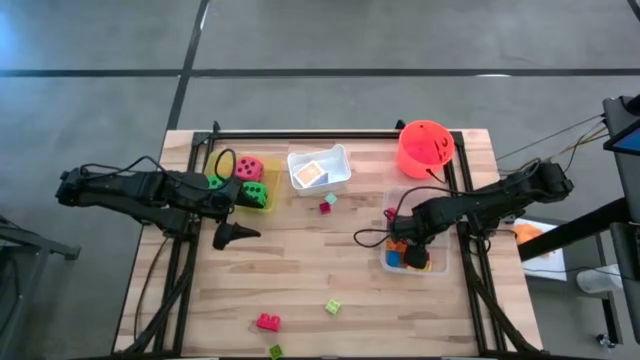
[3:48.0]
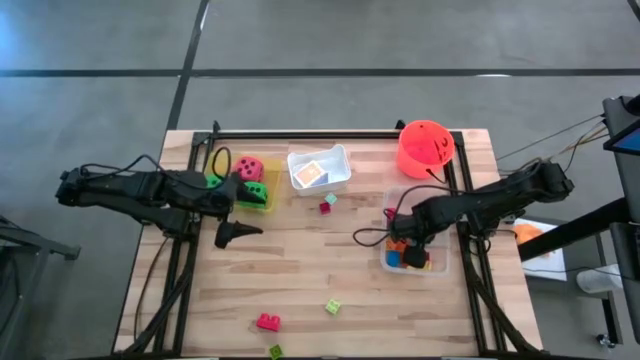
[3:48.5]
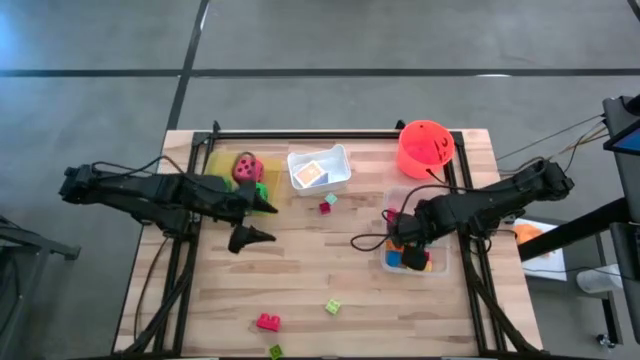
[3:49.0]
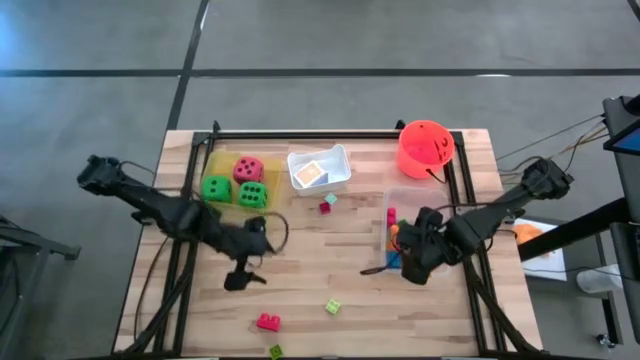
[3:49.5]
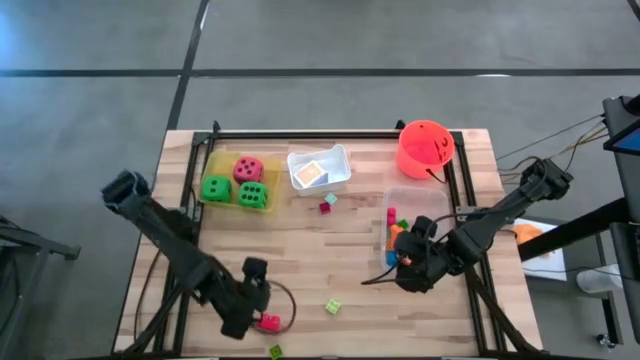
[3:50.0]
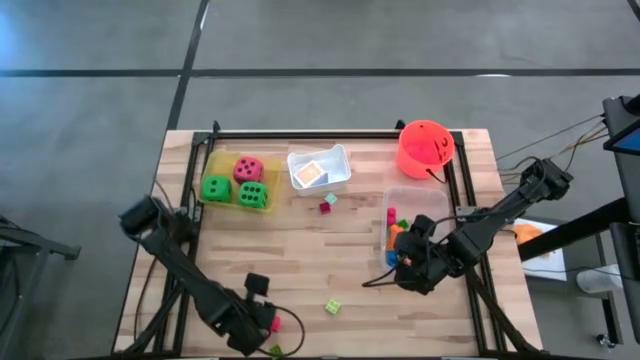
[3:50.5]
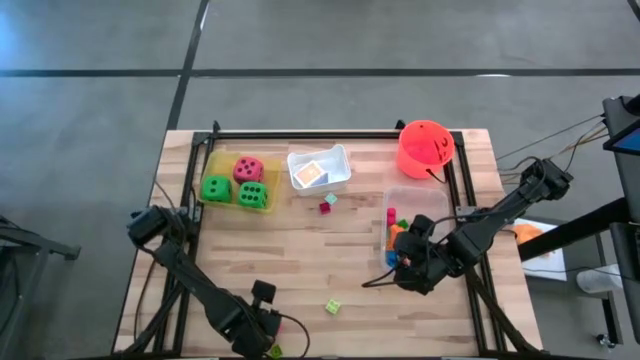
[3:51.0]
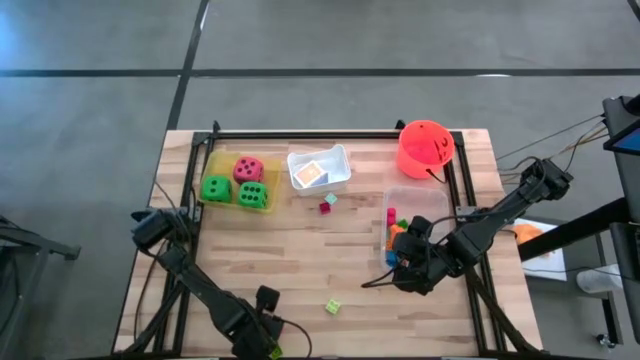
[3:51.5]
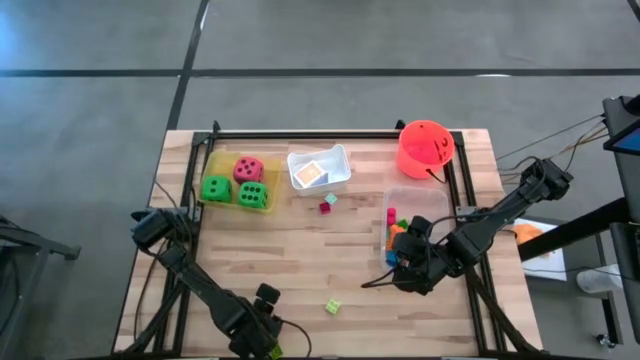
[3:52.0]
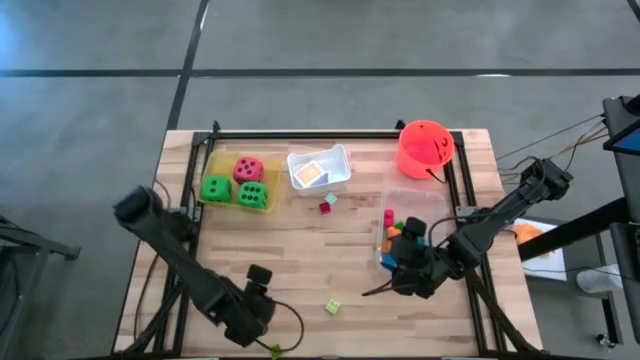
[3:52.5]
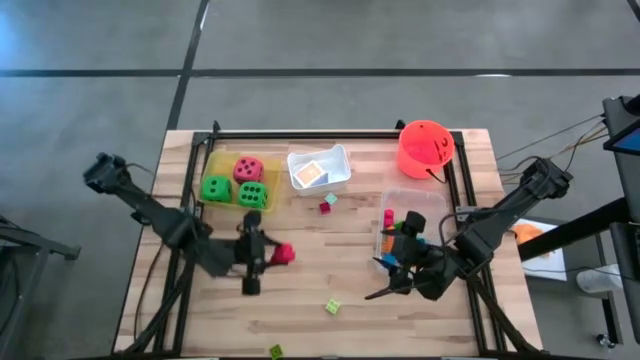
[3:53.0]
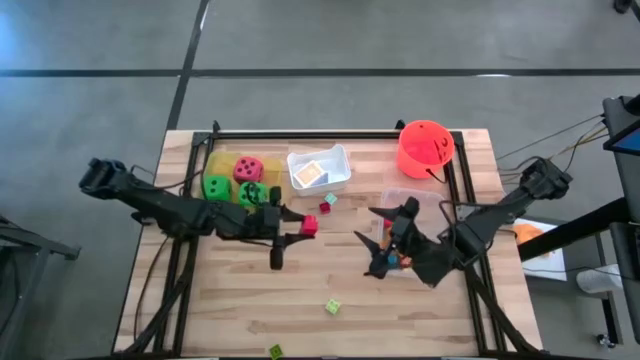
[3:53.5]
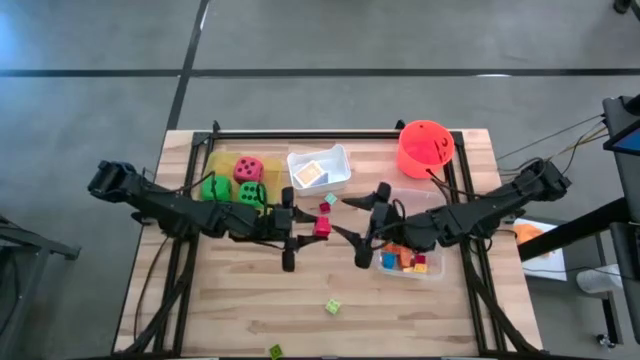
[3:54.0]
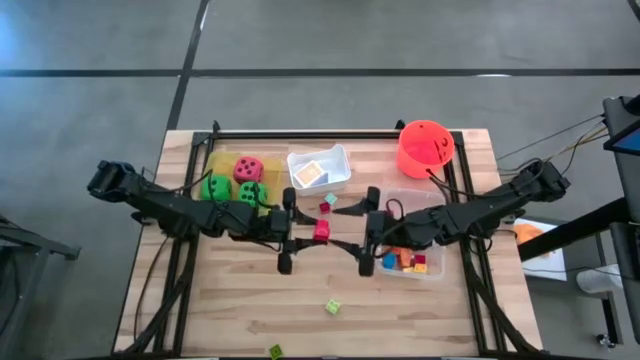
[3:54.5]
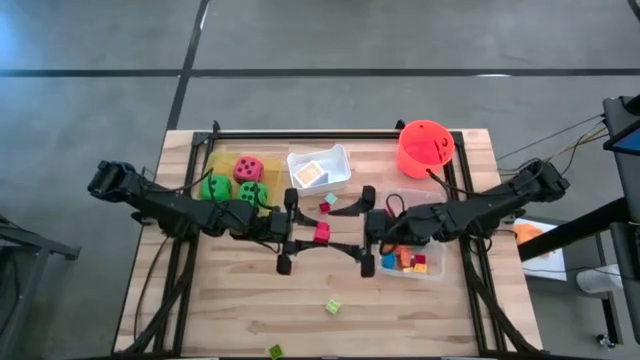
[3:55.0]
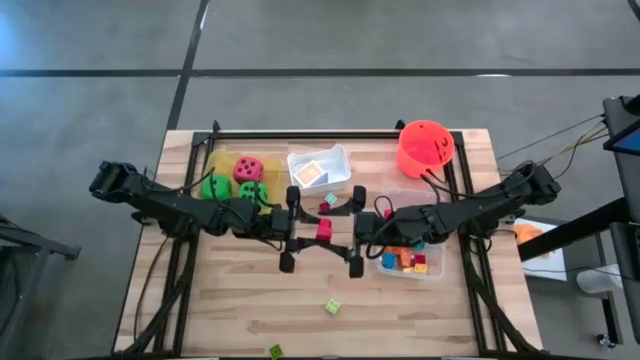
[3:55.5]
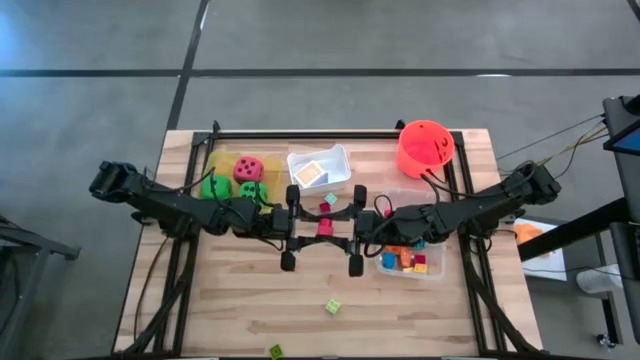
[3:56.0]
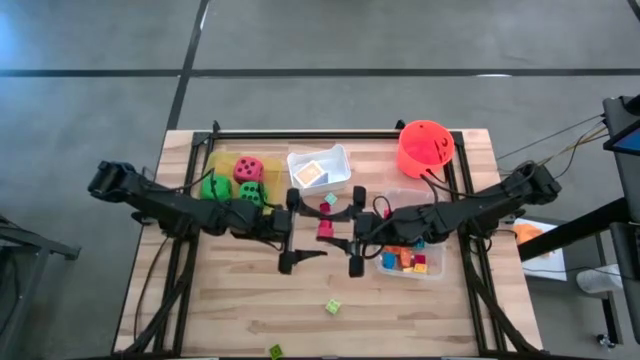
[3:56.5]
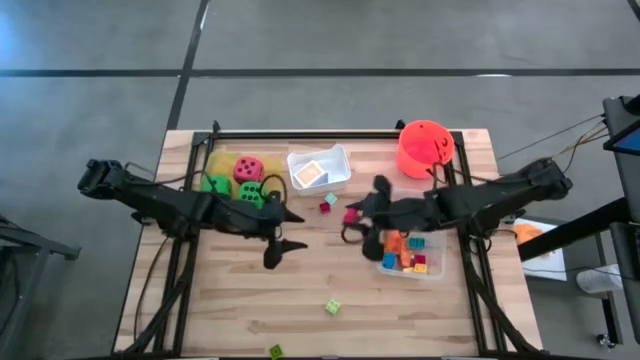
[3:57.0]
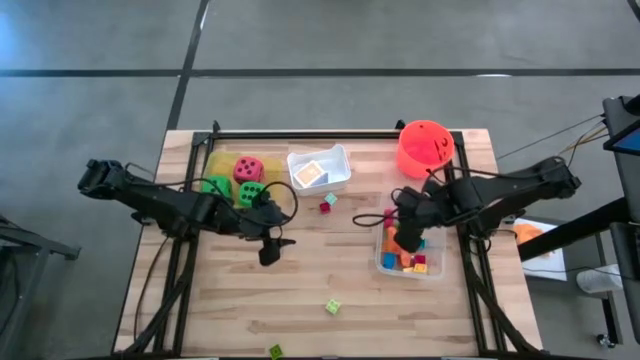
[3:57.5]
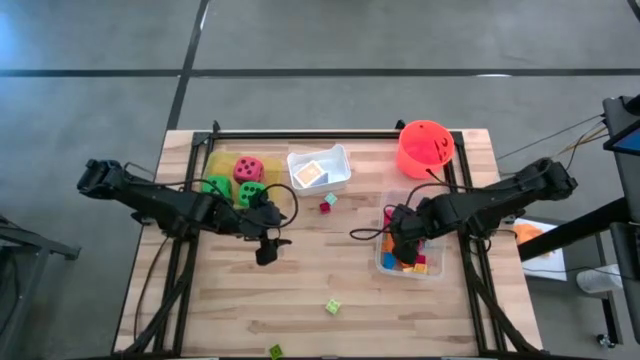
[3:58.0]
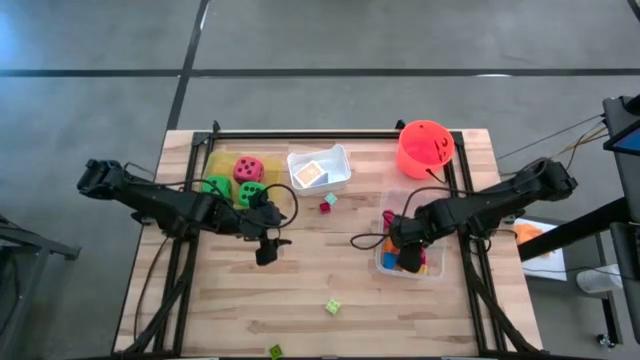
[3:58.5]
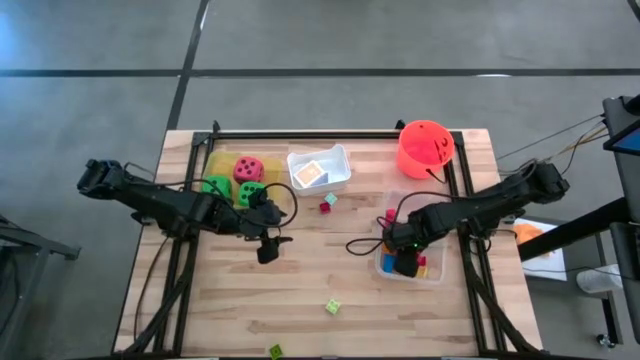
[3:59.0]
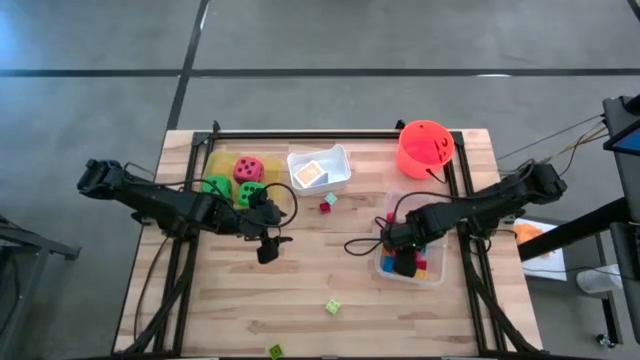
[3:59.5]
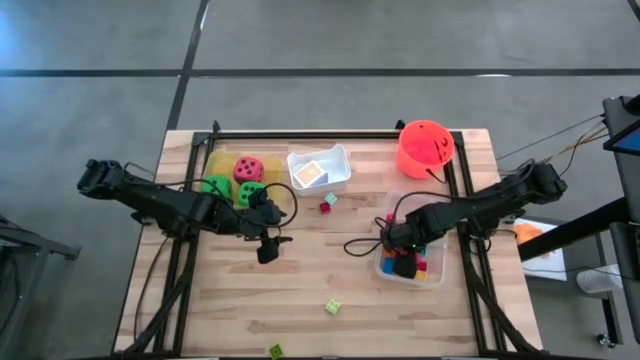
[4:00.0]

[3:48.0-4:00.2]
Task: Pick & Place Toys
Put the red game piece into the transparent bin

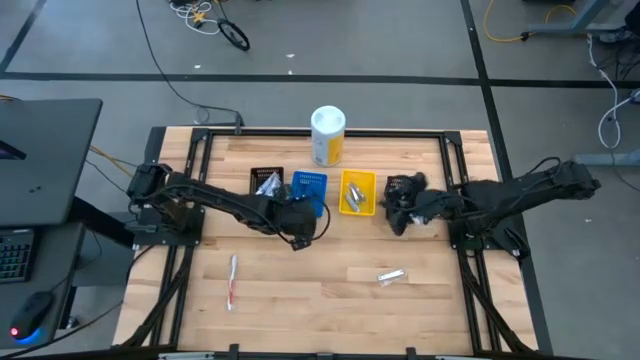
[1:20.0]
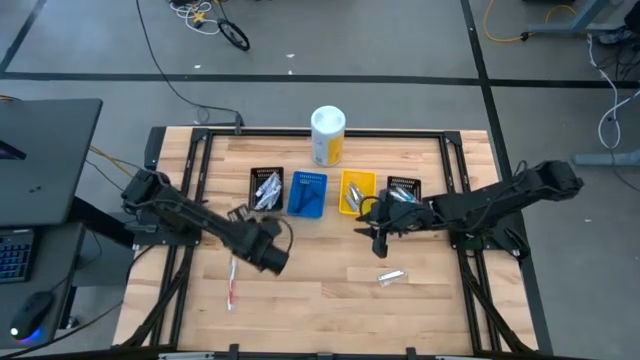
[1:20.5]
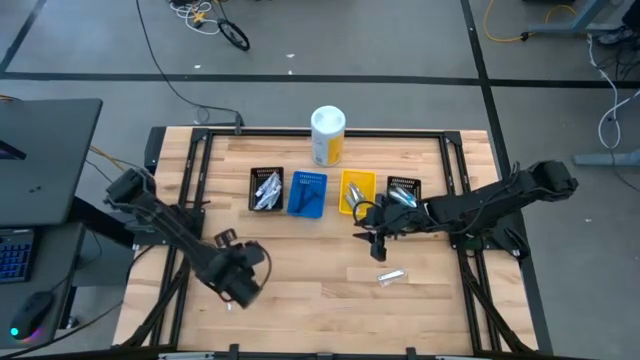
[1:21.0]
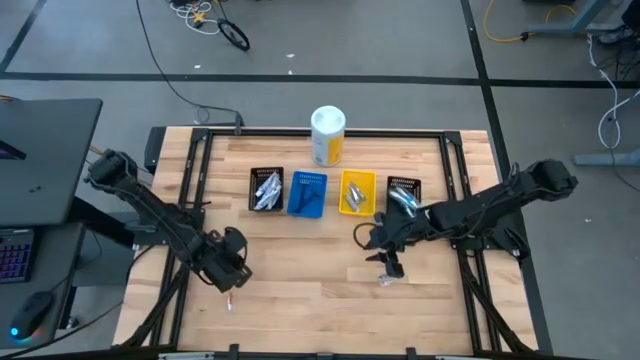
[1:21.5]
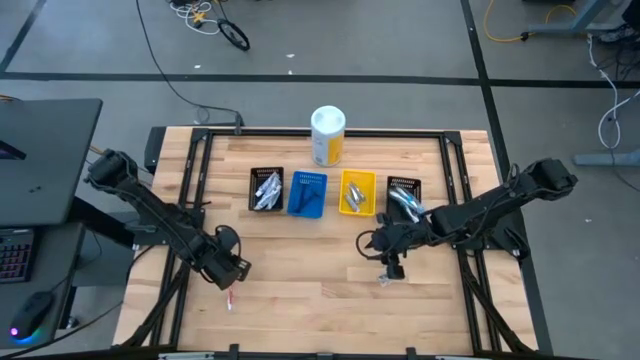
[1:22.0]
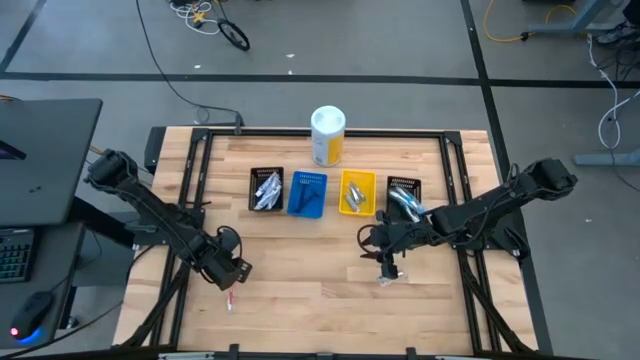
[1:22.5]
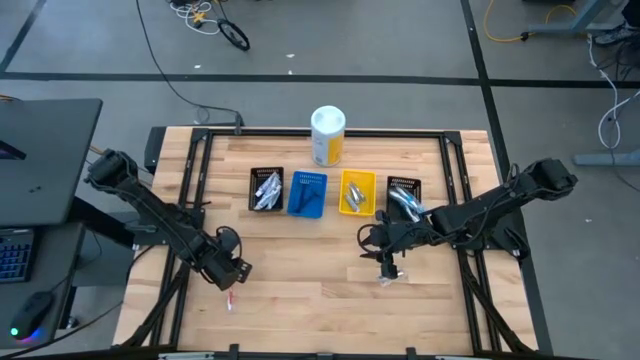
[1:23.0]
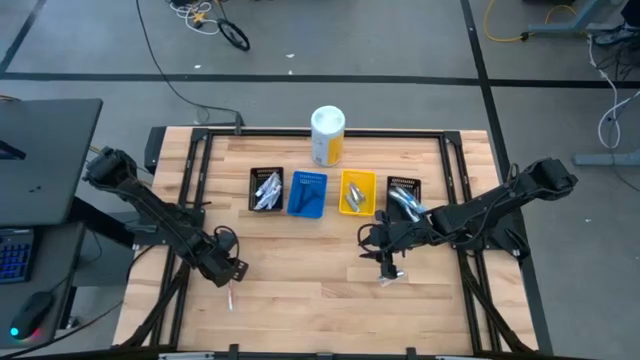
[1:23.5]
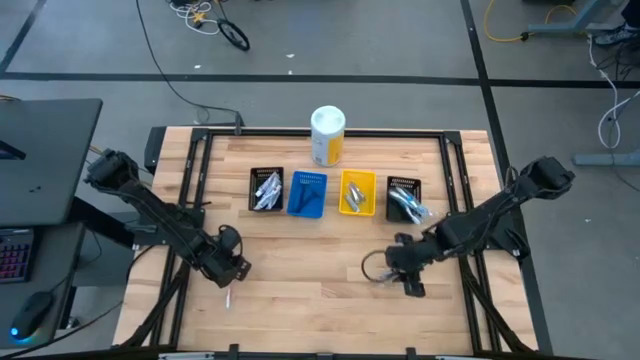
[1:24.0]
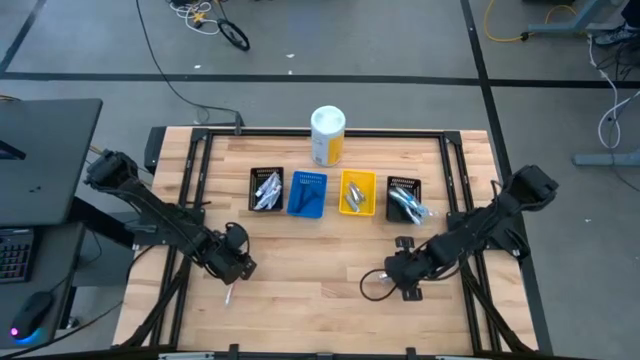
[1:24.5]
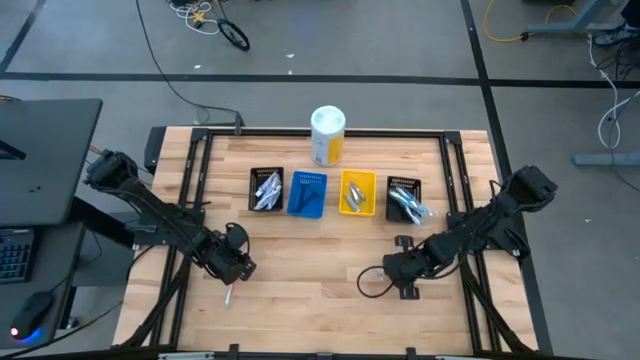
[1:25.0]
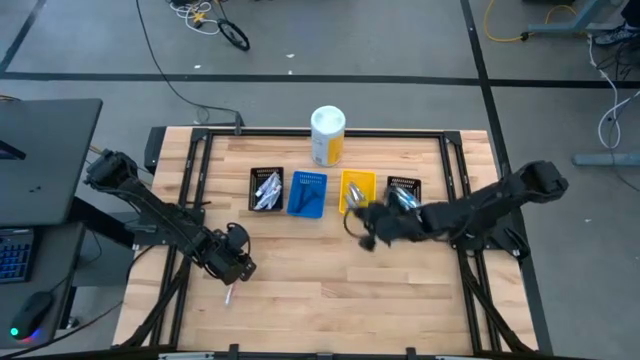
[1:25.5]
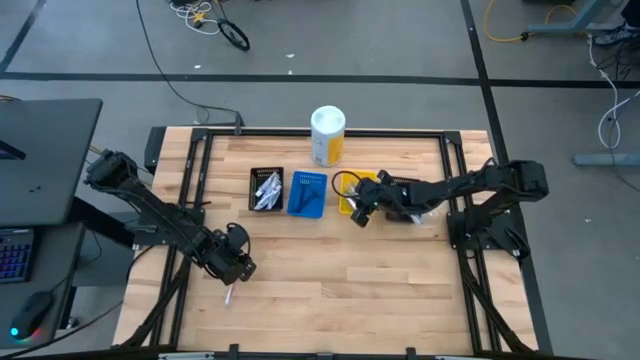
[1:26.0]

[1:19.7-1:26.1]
Task: Pick & Place Travel size toiletries
Put the nail cutter into the yellow bin
